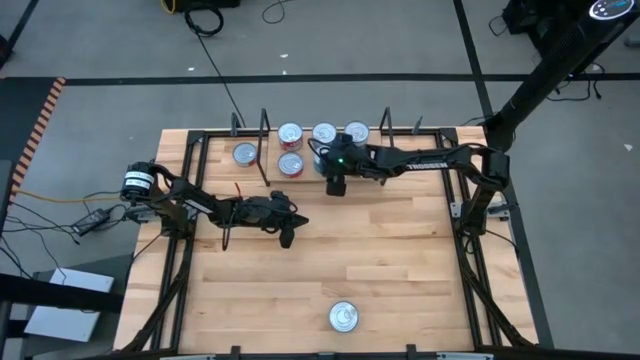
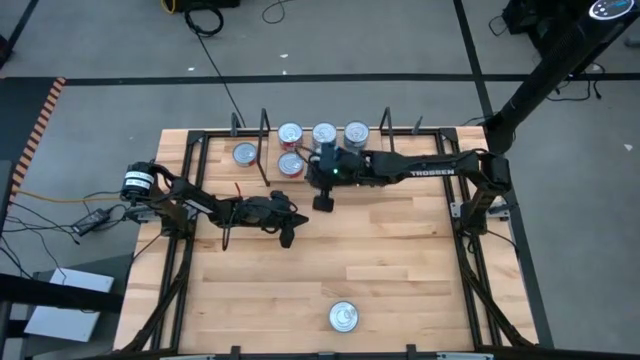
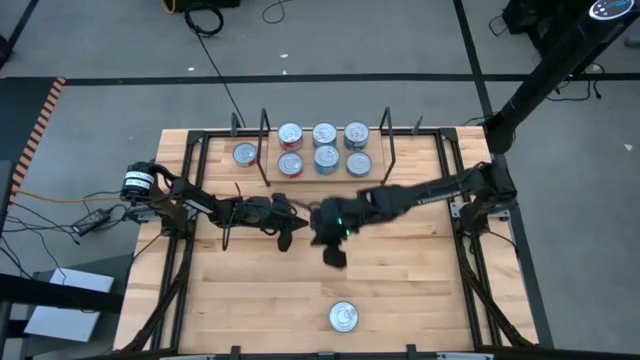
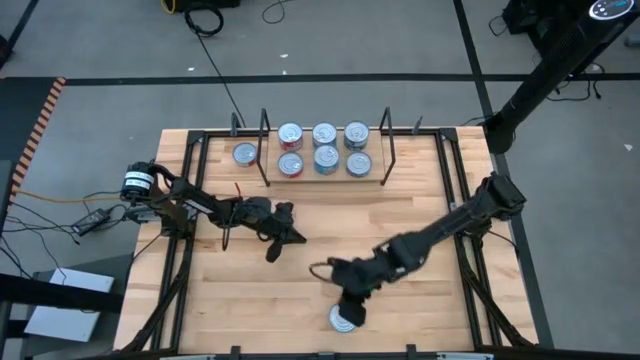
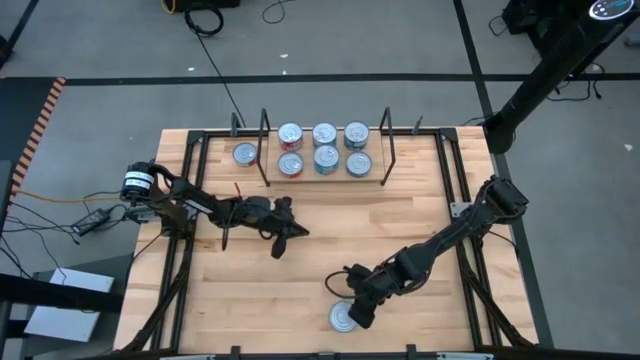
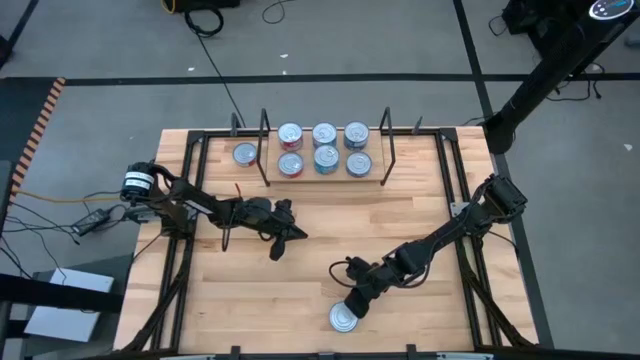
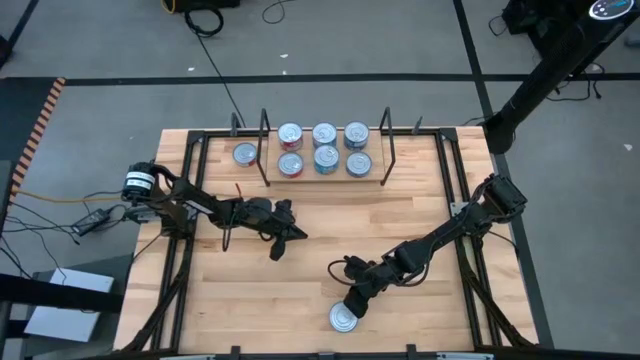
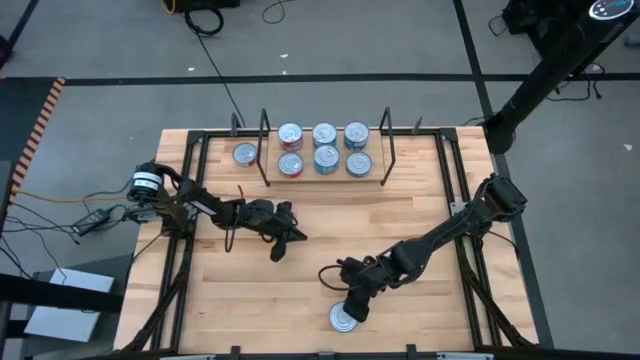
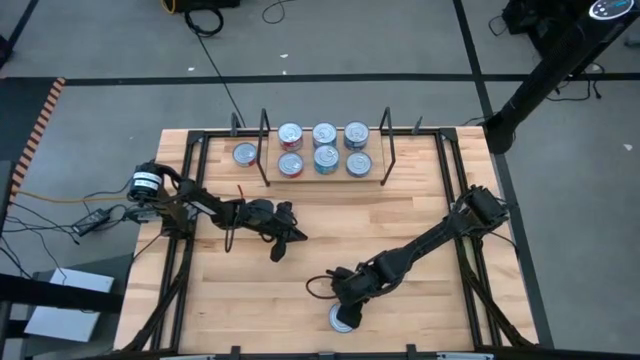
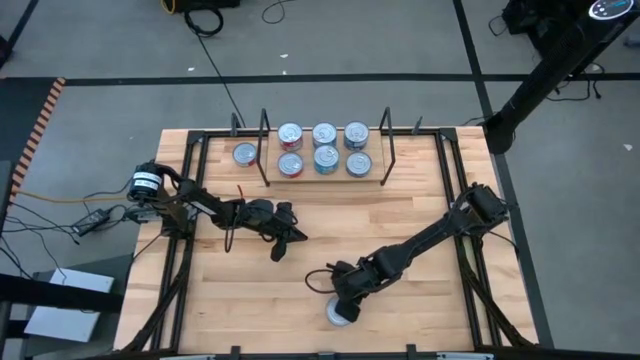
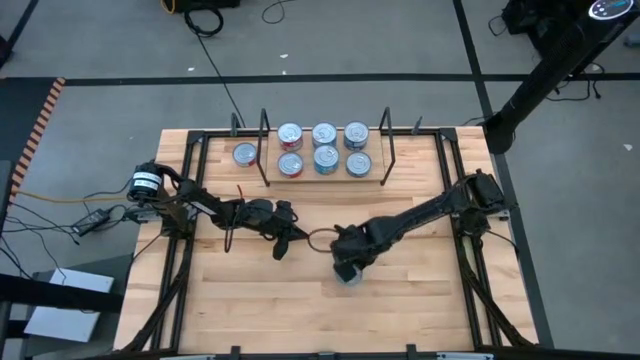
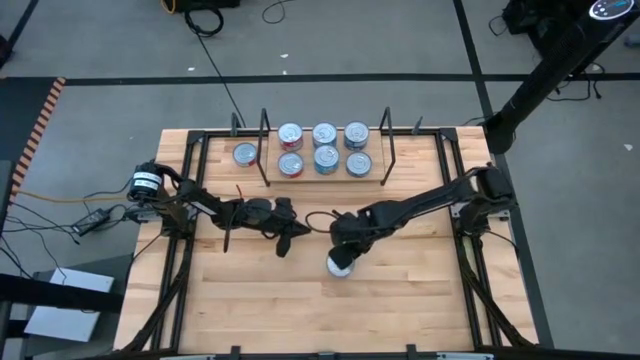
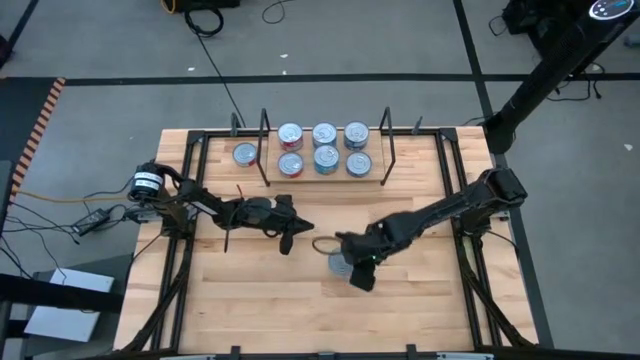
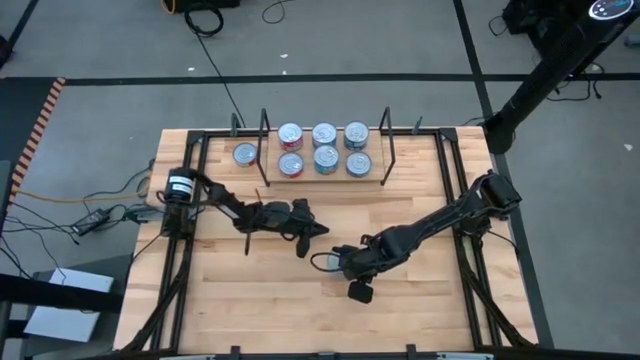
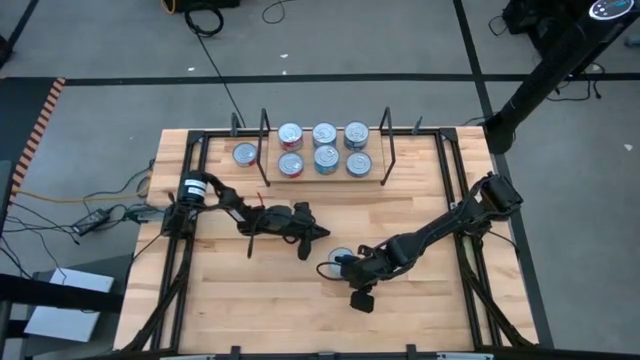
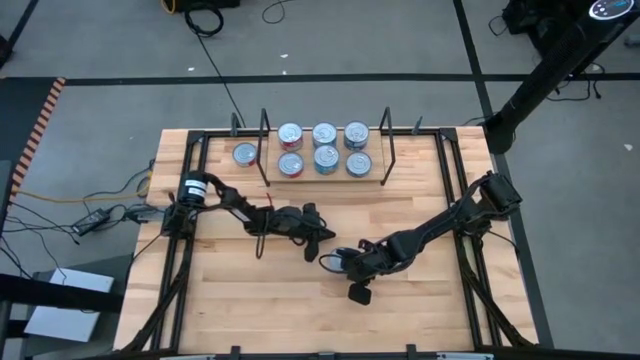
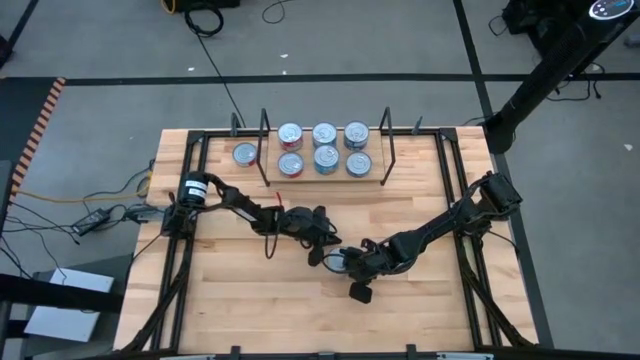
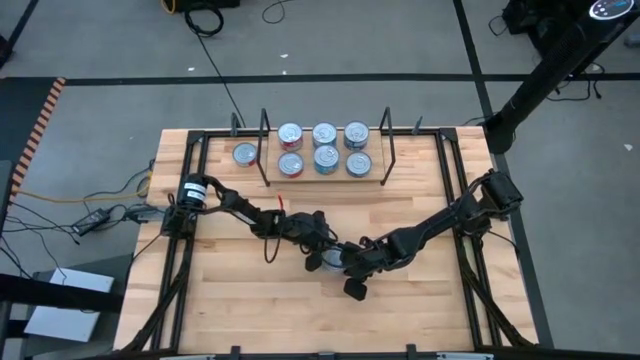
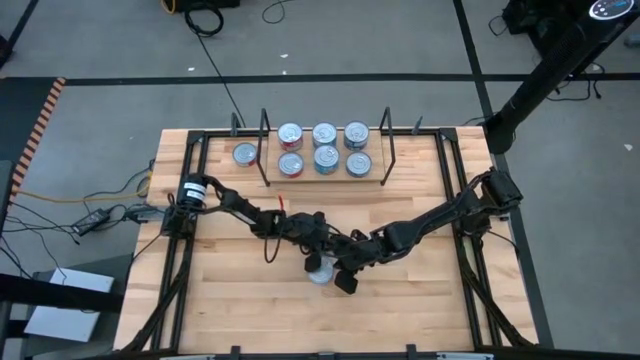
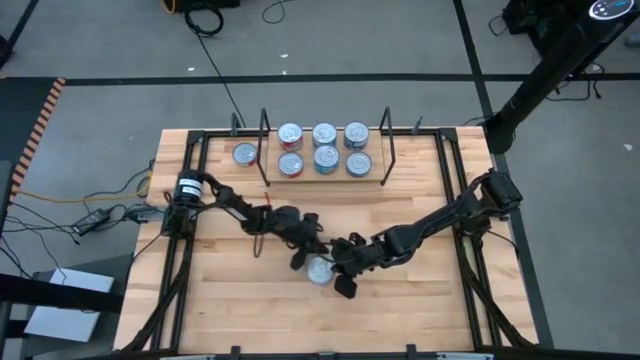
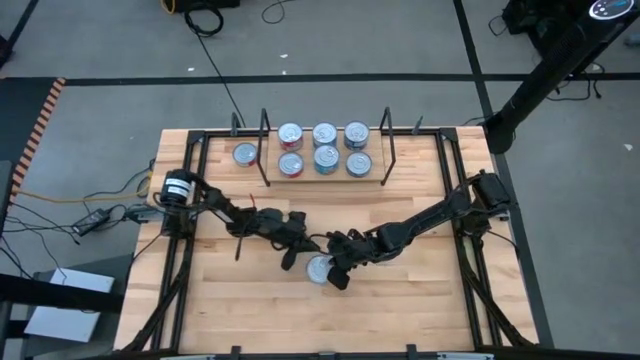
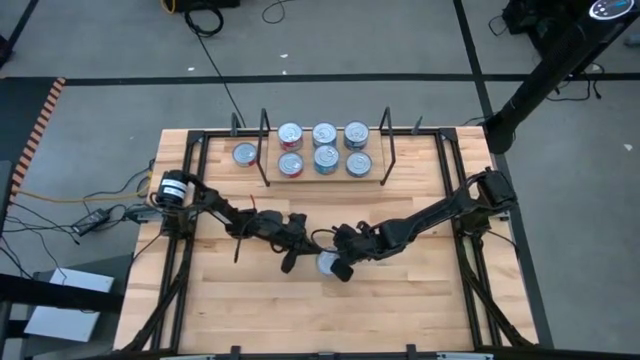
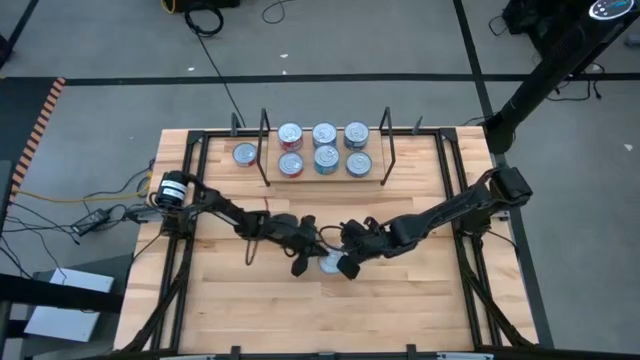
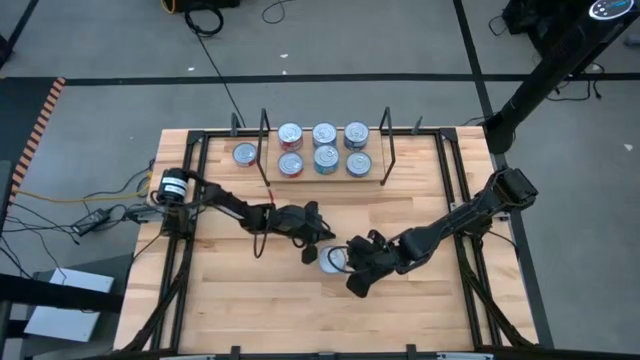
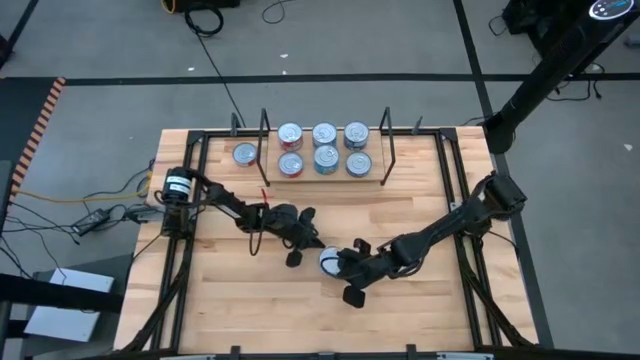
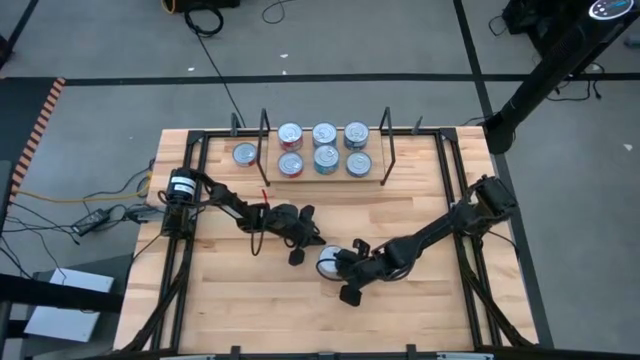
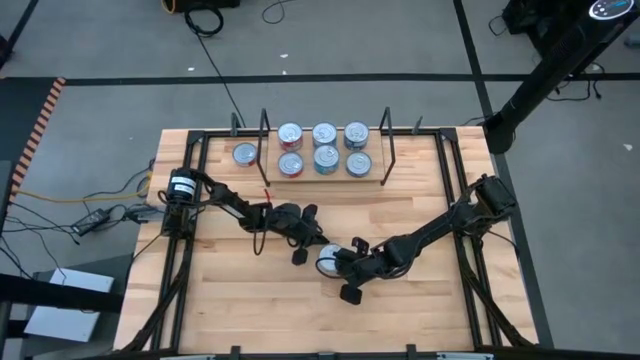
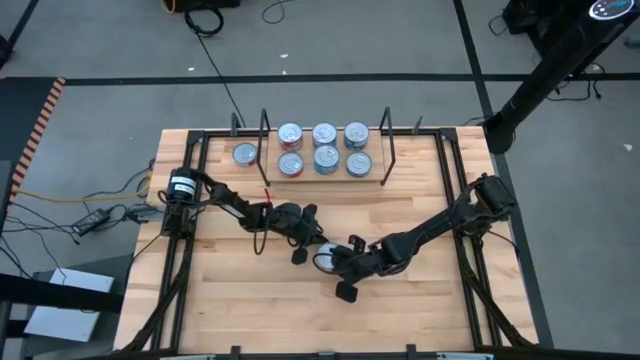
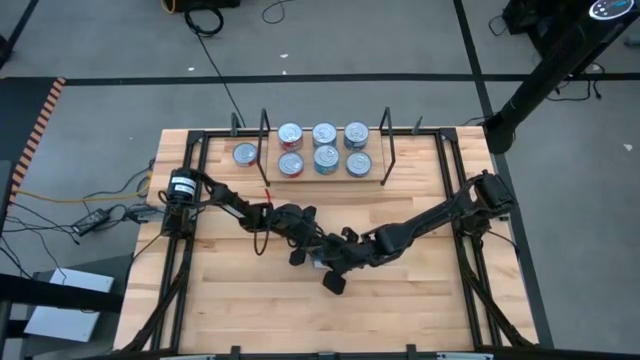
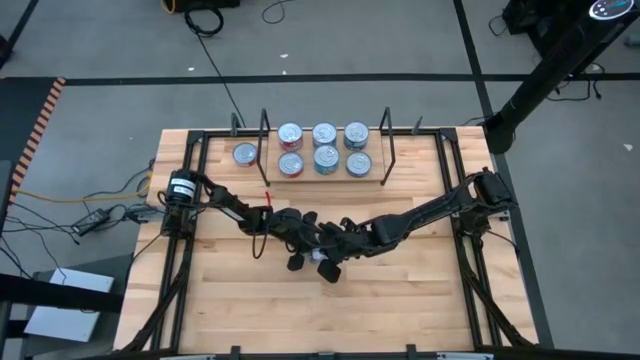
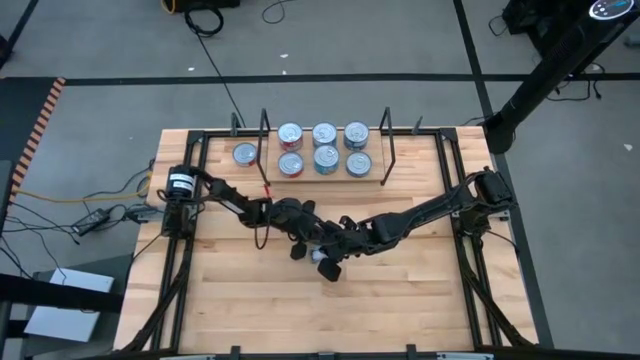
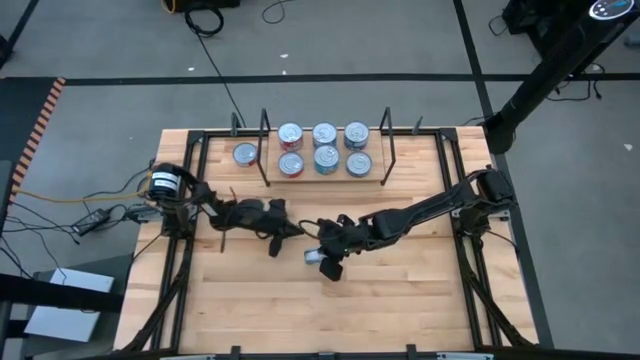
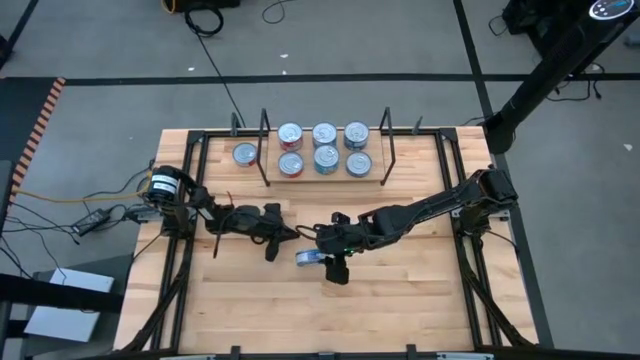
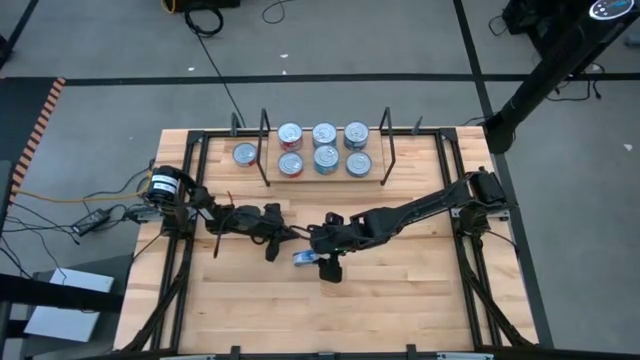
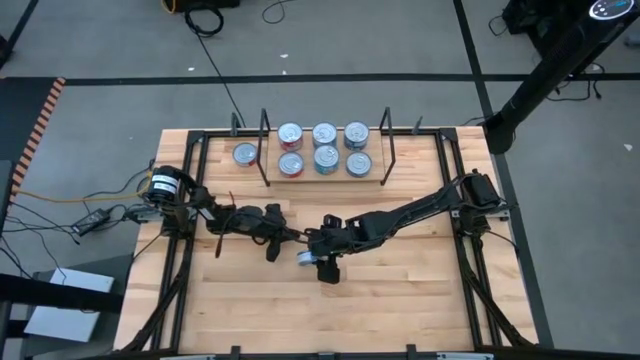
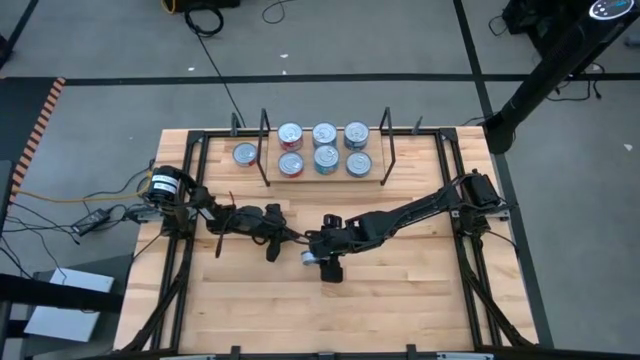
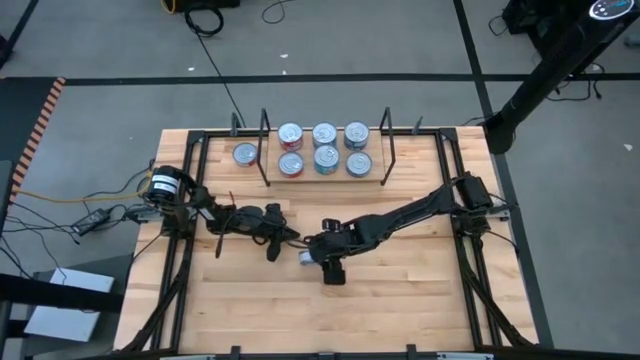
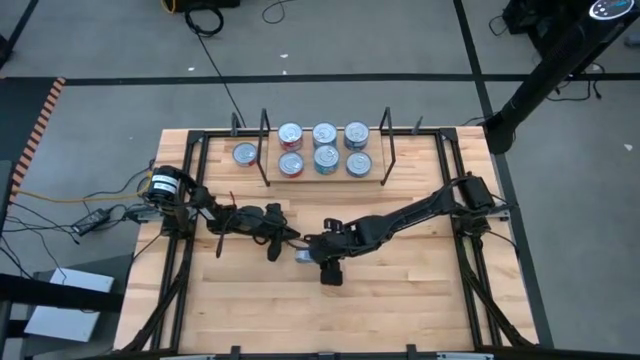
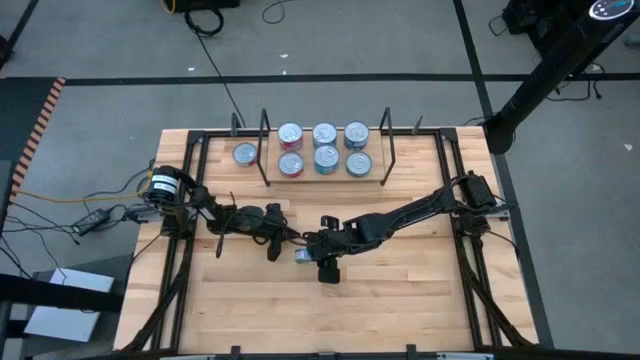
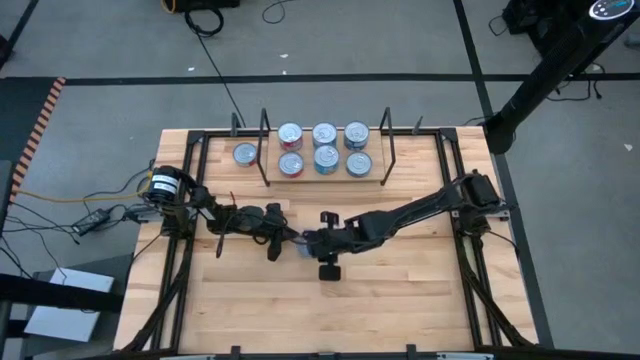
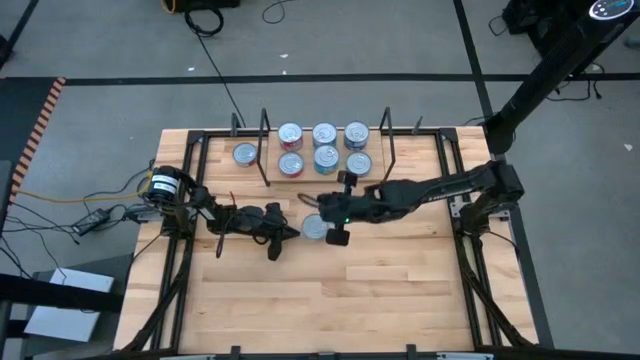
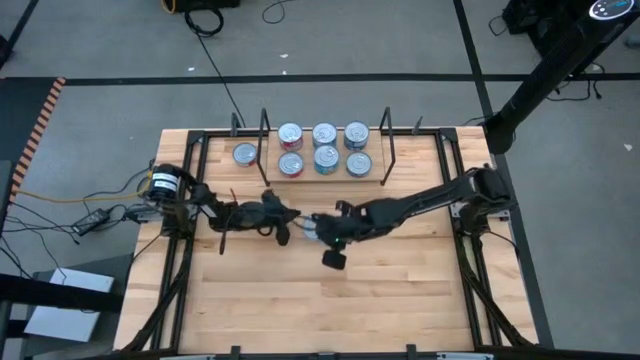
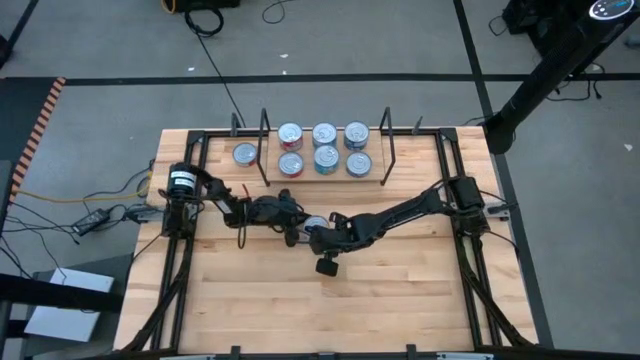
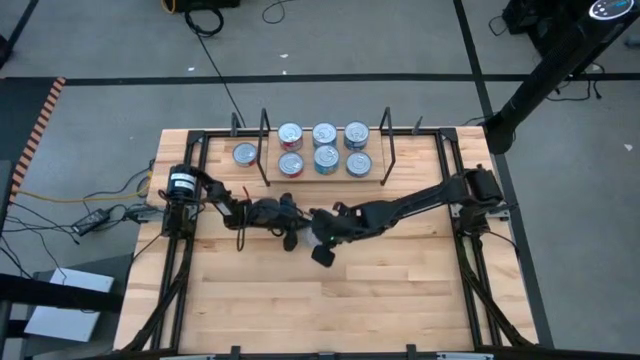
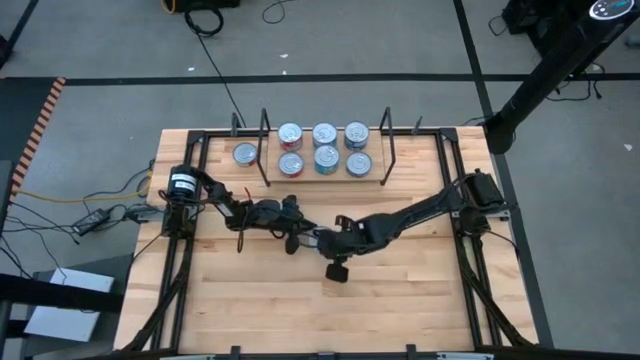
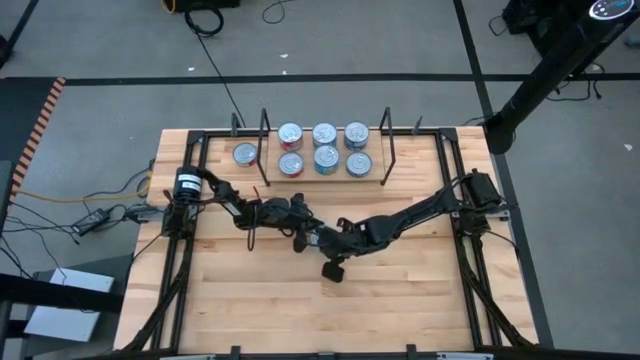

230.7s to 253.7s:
Task: Stack canned seafood by type on shelf
Stack the blue tuna can on top of the other blue tuna can
